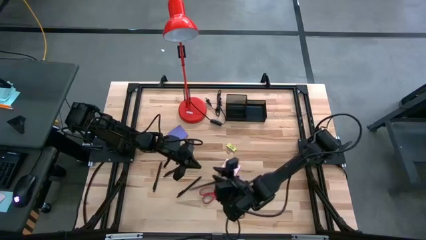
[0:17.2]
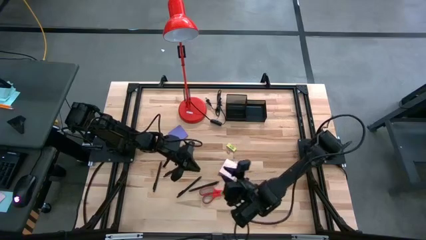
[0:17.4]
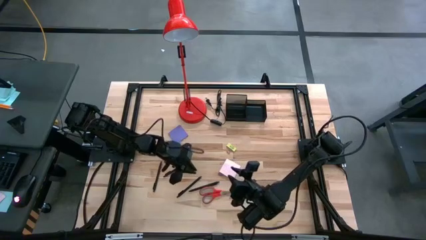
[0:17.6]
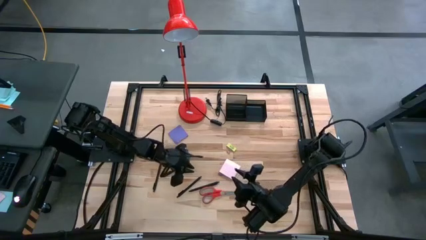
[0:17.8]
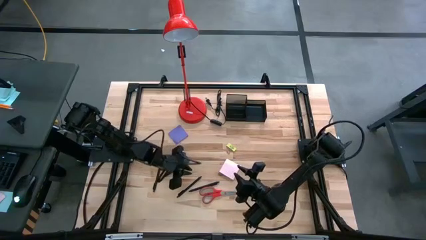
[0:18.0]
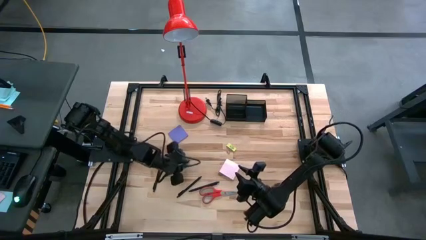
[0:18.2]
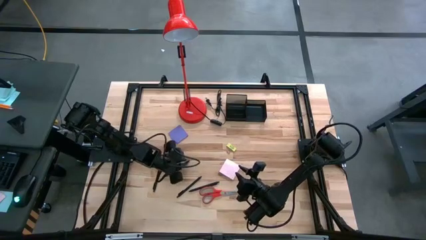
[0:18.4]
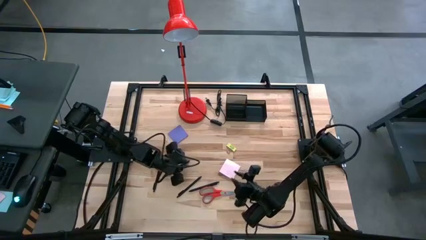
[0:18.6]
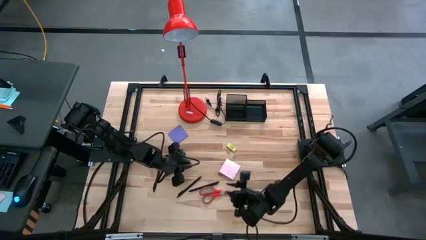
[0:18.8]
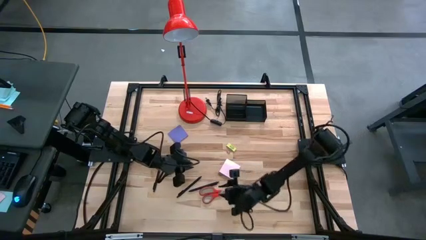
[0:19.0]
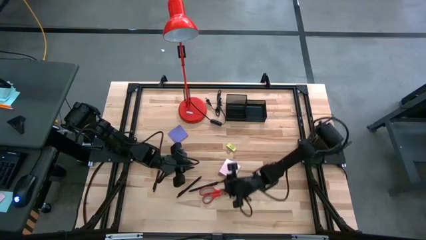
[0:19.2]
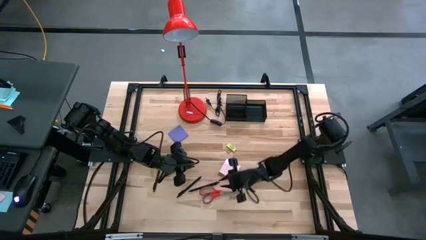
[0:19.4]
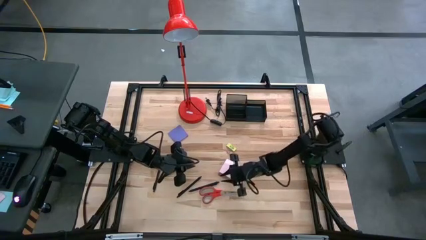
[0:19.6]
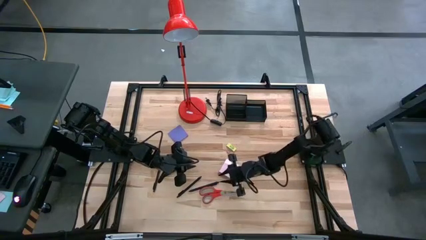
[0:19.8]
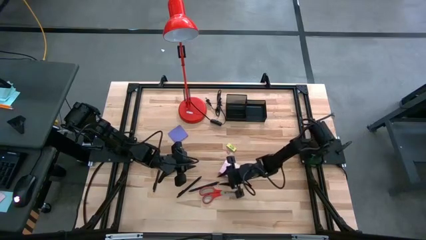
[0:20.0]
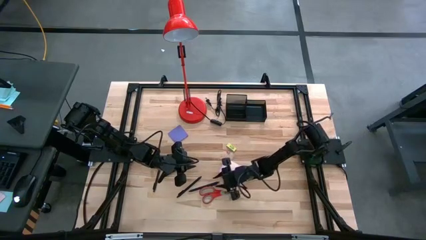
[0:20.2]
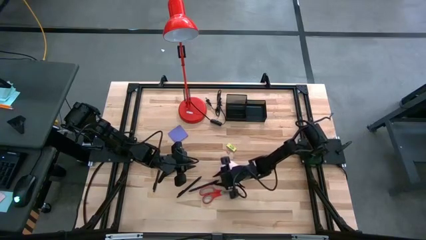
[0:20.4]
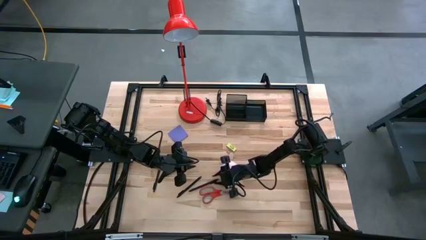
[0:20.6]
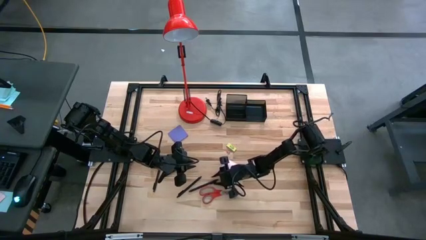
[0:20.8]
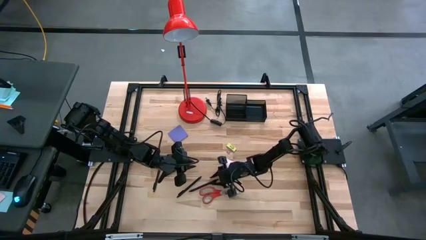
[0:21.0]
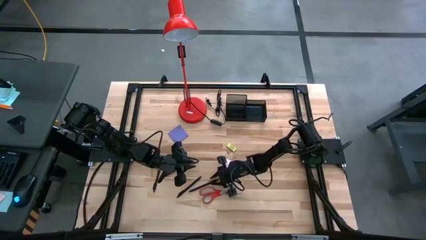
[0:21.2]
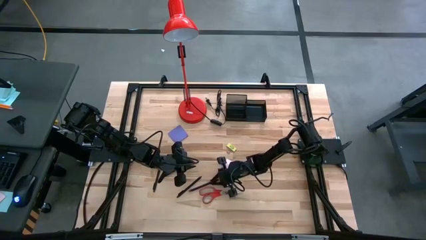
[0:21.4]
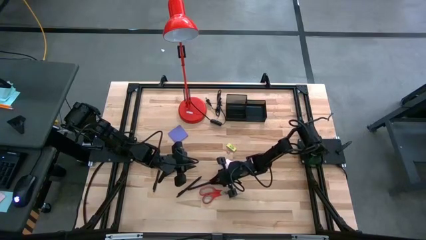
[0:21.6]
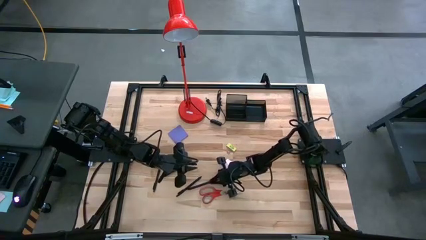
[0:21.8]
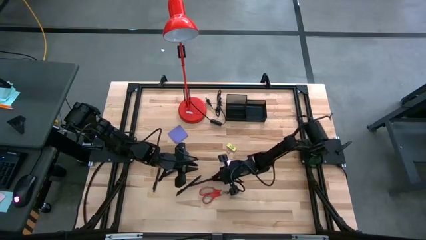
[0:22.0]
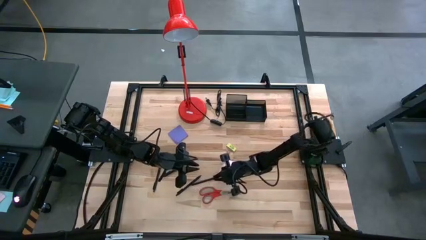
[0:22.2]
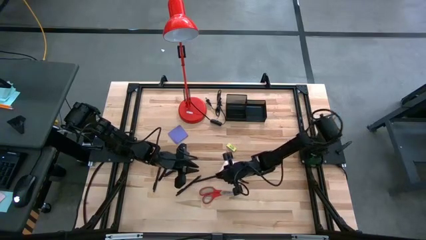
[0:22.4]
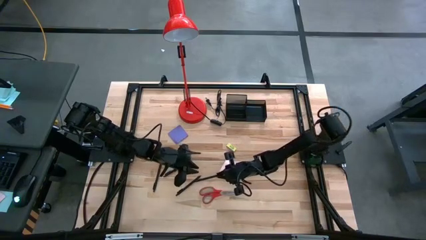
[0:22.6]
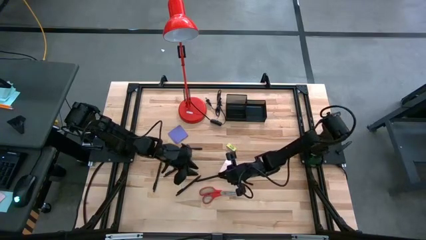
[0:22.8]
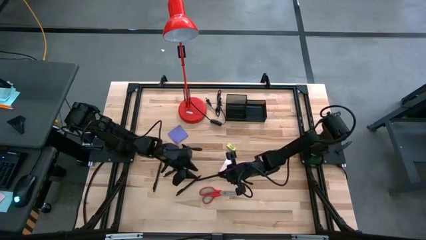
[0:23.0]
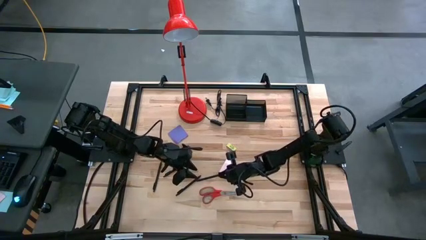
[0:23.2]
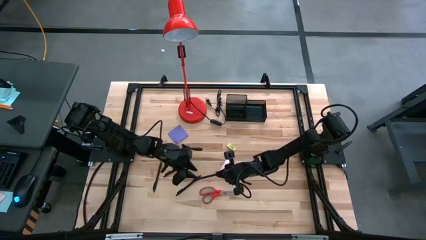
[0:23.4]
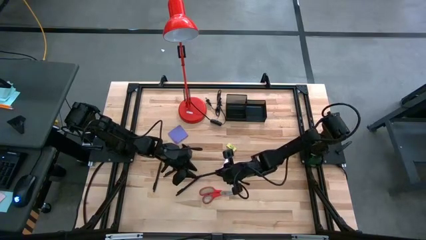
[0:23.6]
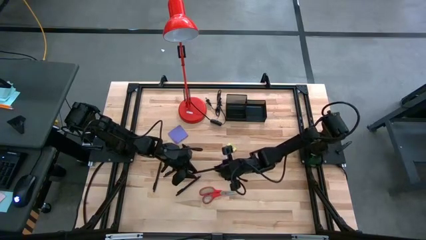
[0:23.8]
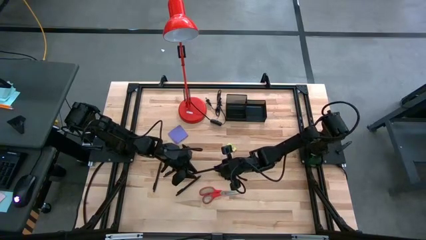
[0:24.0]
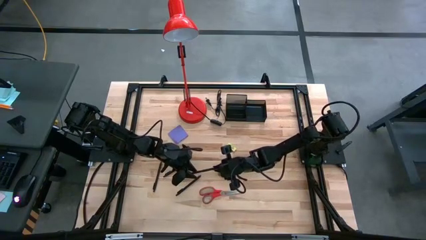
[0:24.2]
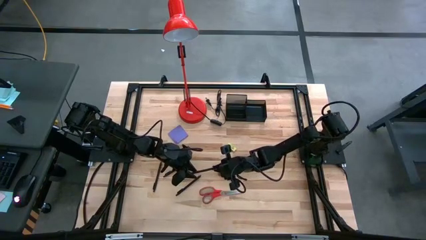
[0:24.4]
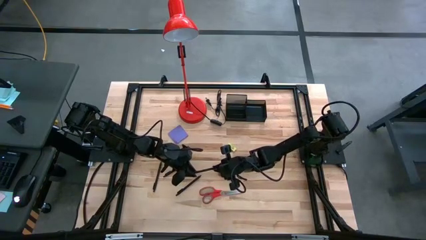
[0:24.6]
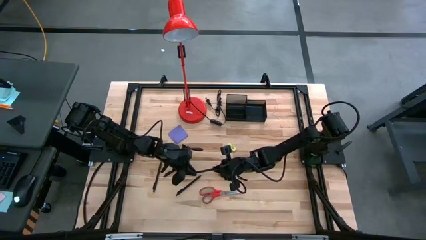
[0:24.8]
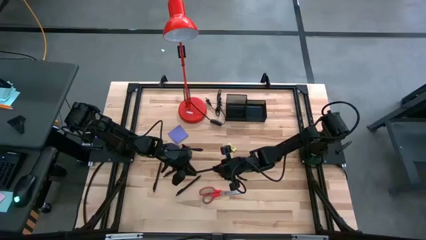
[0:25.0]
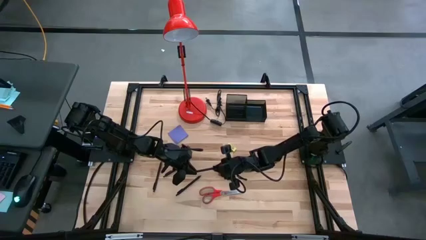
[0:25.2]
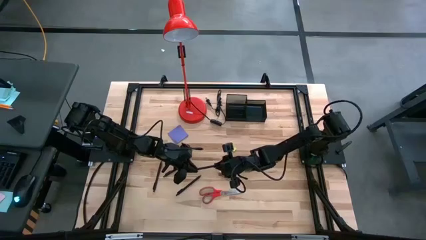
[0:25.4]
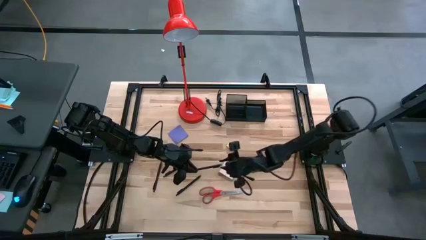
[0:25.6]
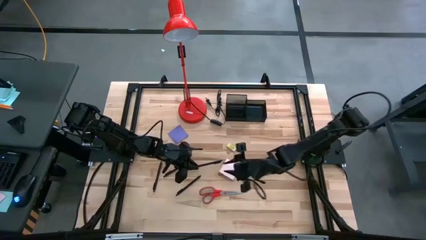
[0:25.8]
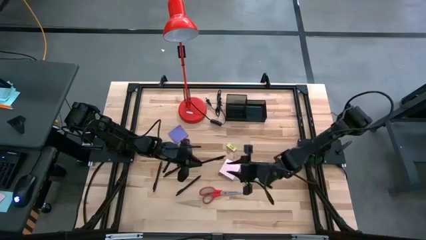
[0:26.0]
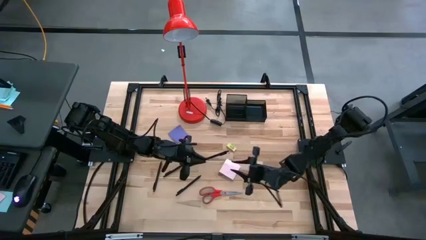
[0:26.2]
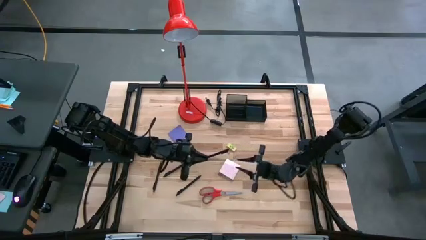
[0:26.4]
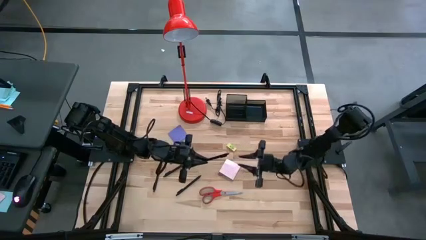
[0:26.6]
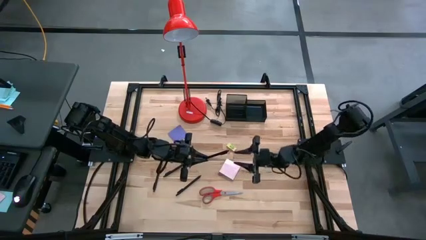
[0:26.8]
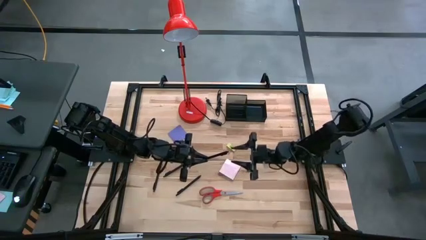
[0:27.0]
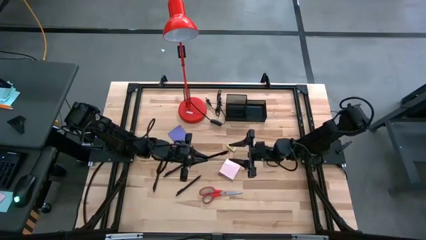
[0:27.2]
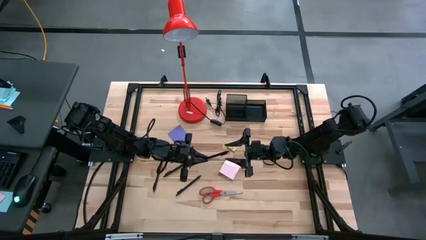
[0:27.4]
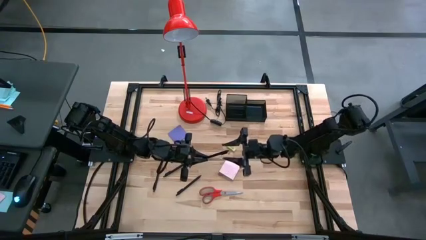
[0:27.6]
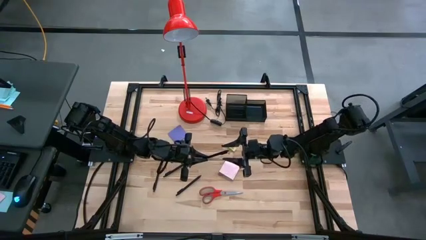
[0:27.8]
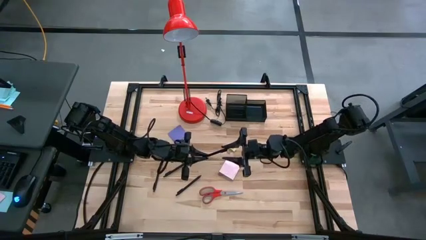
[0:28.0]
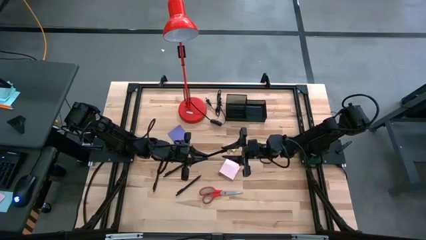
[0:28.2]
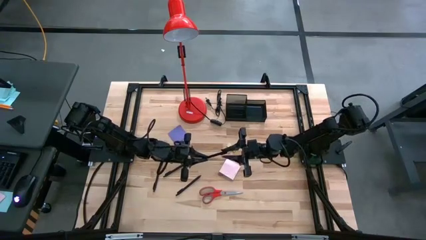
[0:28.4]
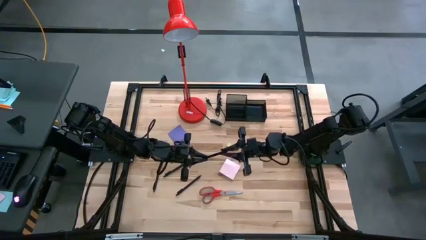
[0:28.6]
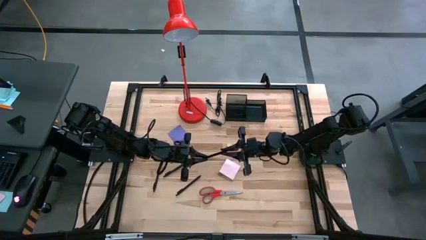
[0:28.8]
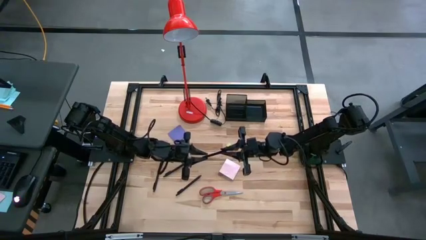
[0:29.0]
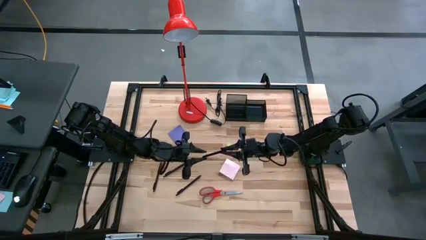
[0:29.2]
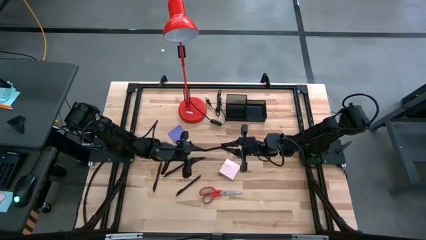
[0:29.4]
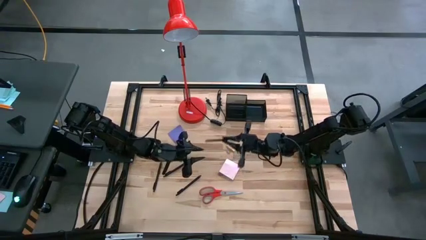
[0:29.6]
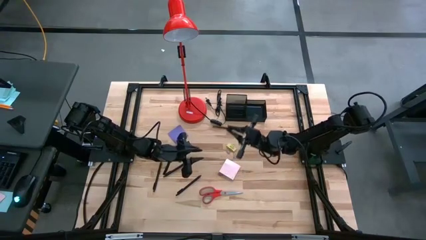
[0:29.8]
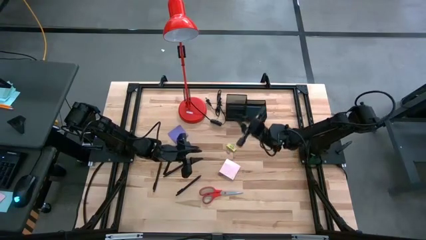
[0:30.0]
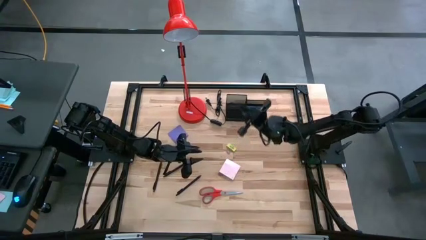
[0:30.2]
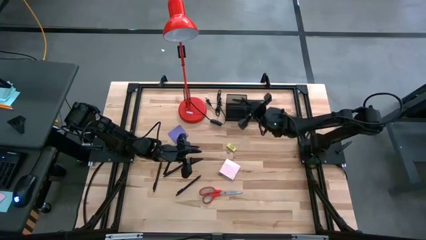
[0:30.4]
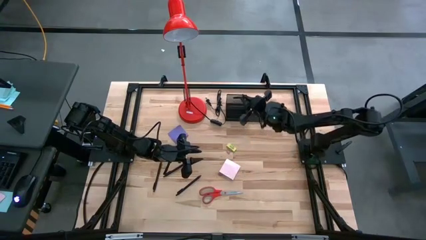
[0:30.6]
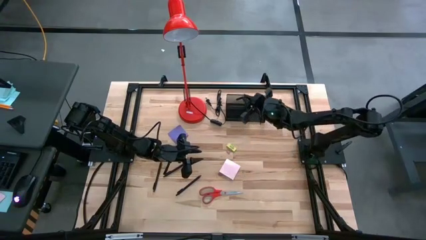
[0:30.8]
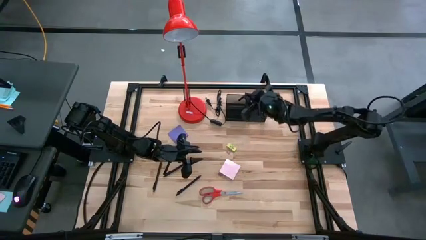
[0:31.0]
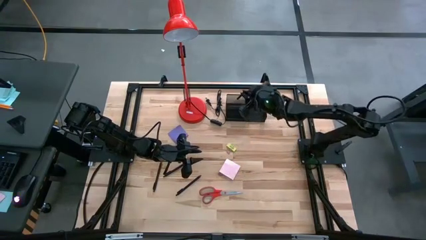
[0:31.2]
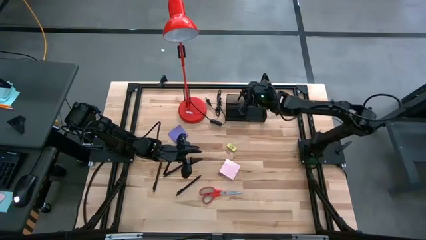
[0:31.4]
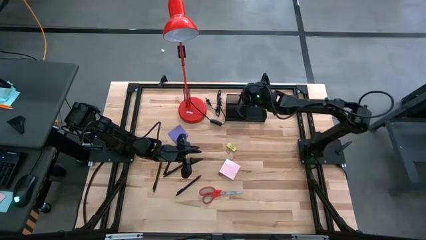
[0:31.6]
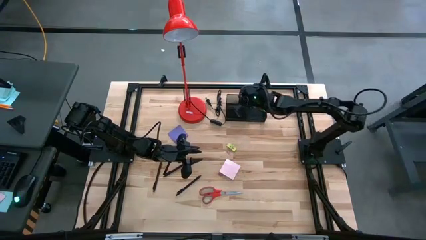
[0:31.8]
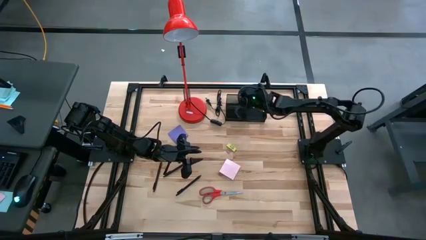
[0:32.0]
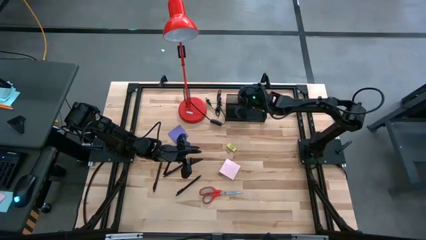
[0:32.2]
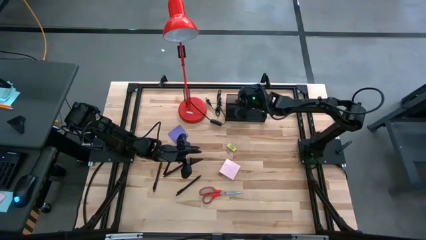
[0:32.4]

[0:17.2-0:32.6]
Task: Pick and place office supplies into organizer
Put the black pen into the black desk organizer
